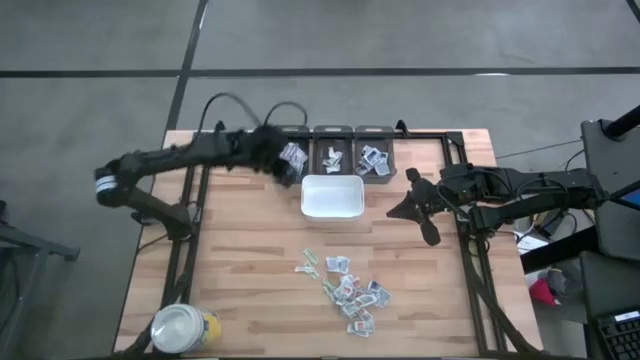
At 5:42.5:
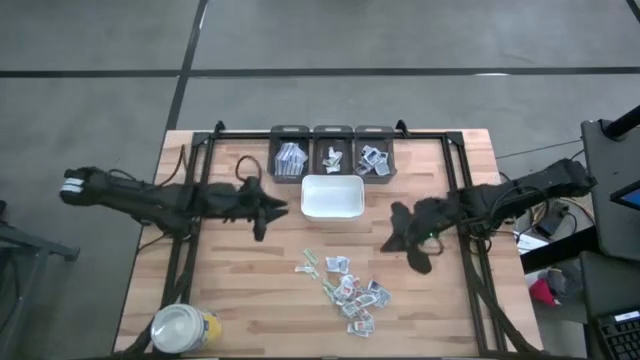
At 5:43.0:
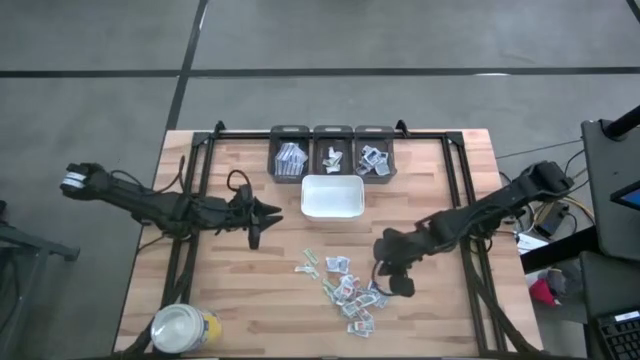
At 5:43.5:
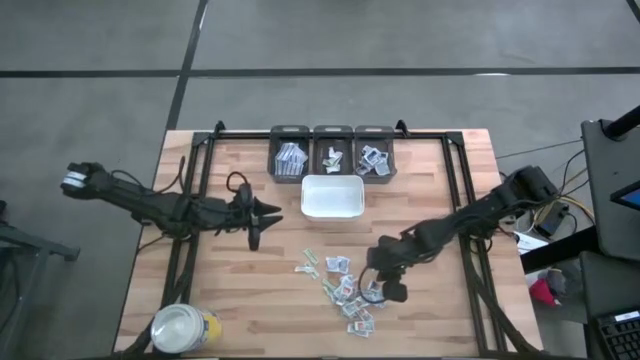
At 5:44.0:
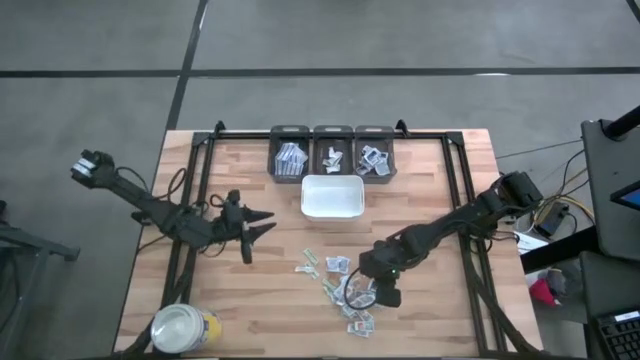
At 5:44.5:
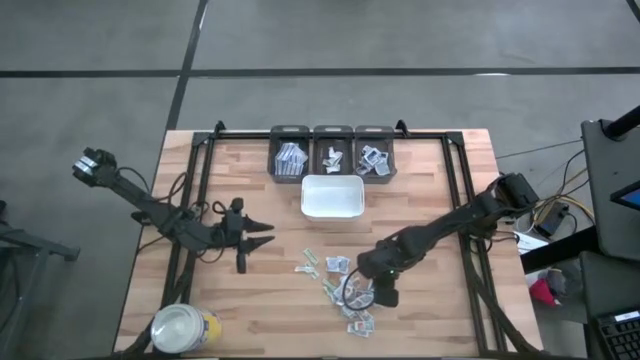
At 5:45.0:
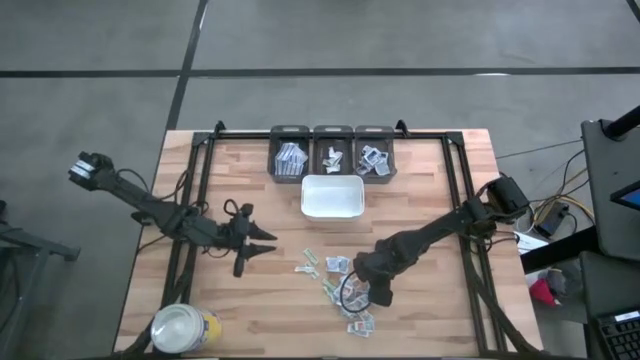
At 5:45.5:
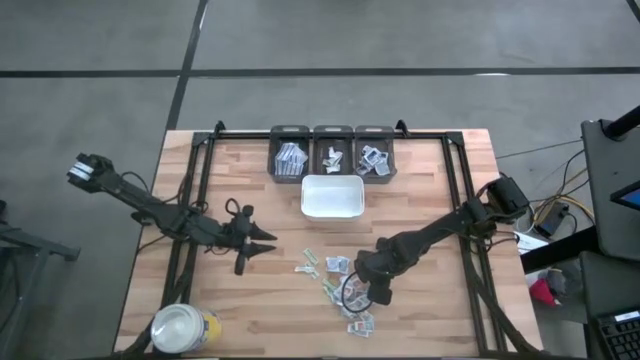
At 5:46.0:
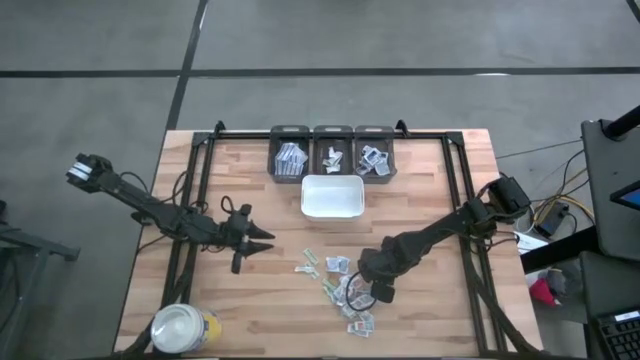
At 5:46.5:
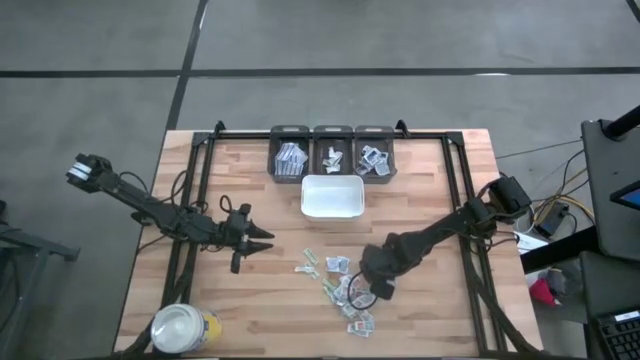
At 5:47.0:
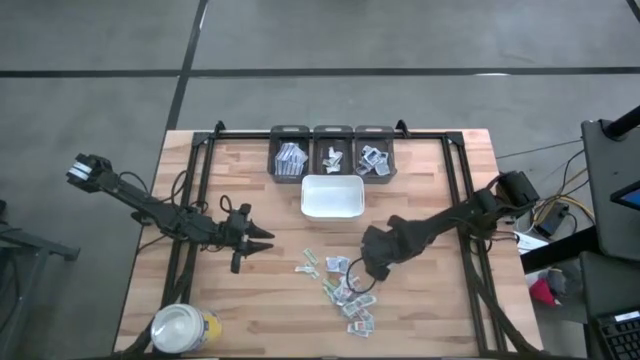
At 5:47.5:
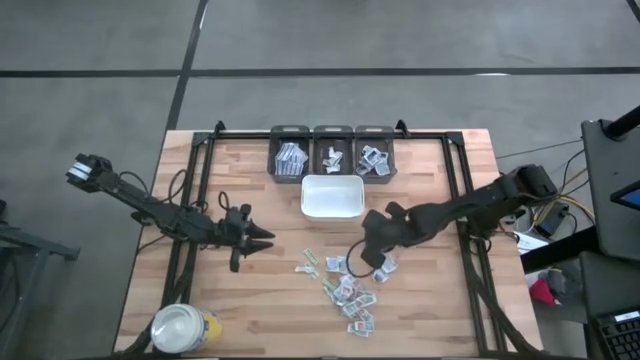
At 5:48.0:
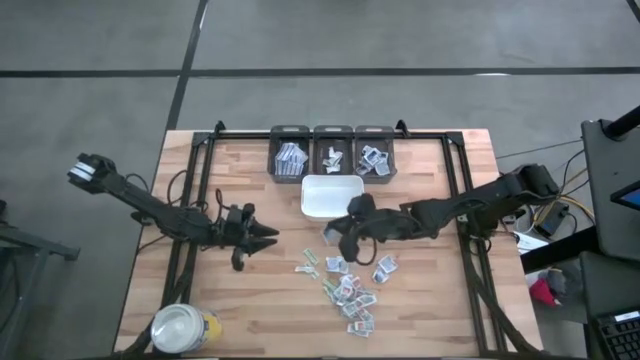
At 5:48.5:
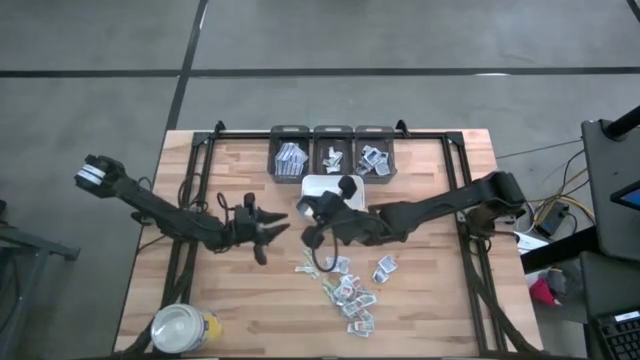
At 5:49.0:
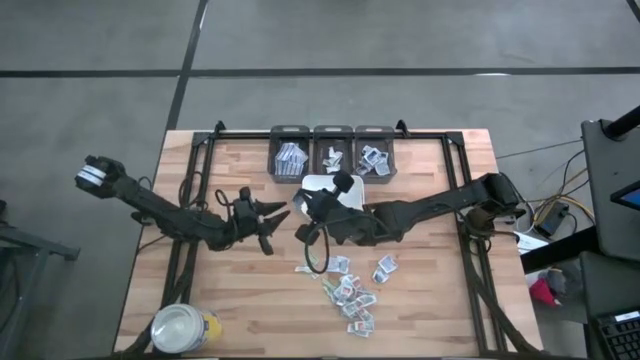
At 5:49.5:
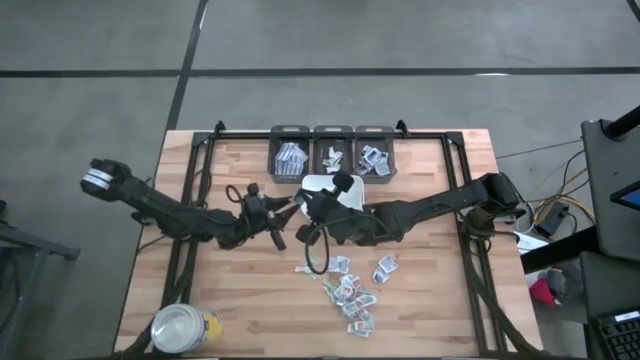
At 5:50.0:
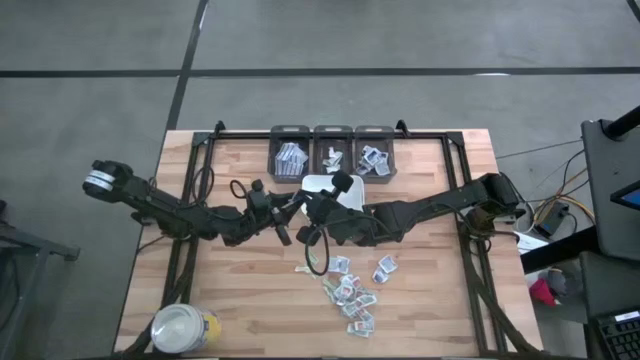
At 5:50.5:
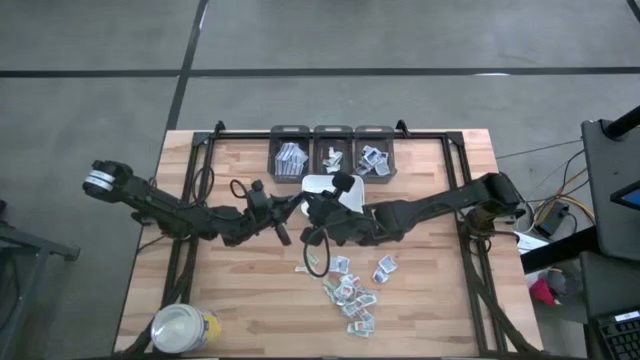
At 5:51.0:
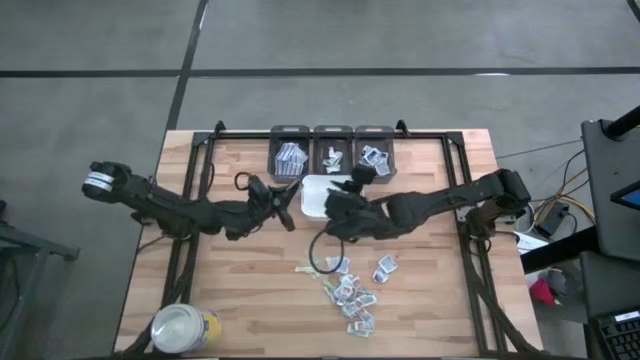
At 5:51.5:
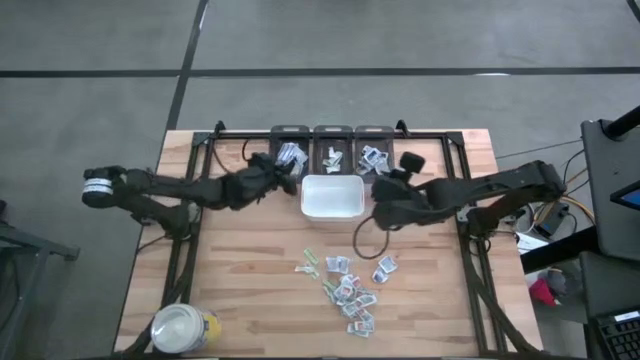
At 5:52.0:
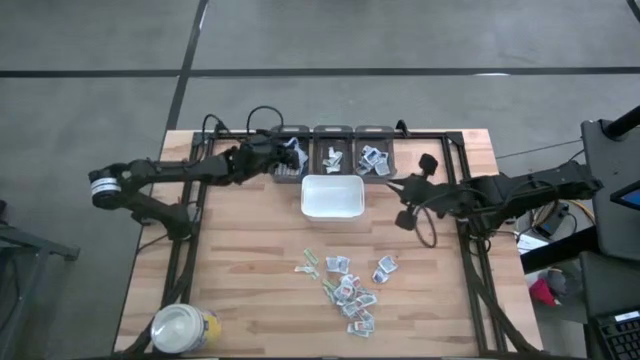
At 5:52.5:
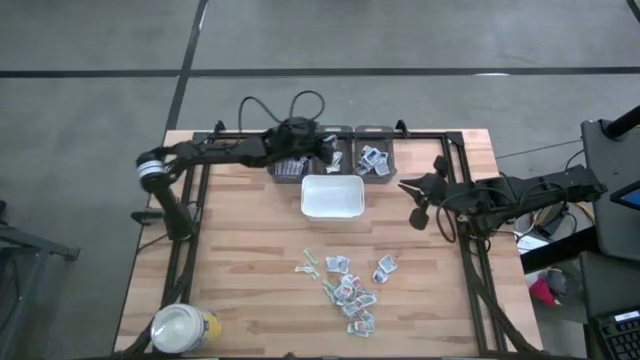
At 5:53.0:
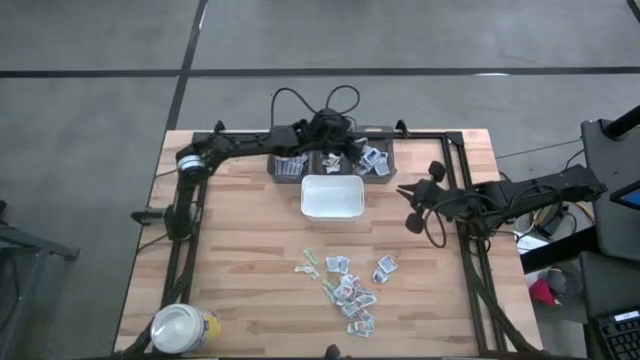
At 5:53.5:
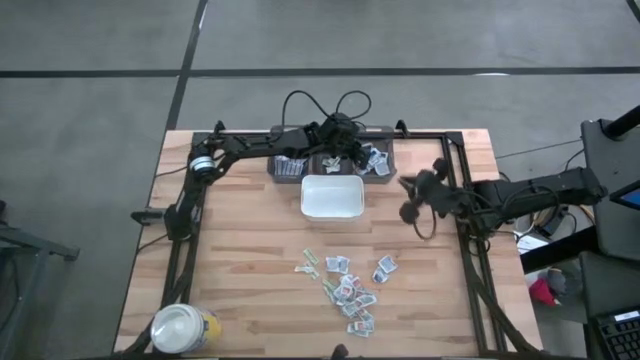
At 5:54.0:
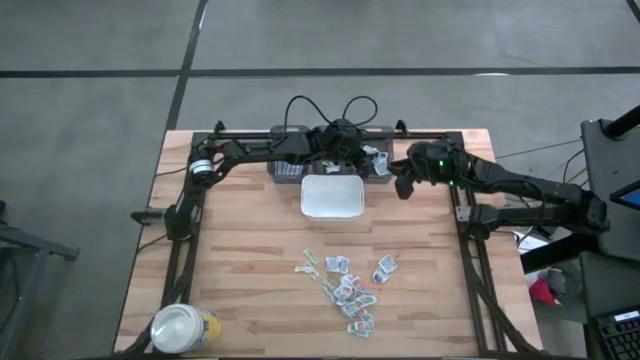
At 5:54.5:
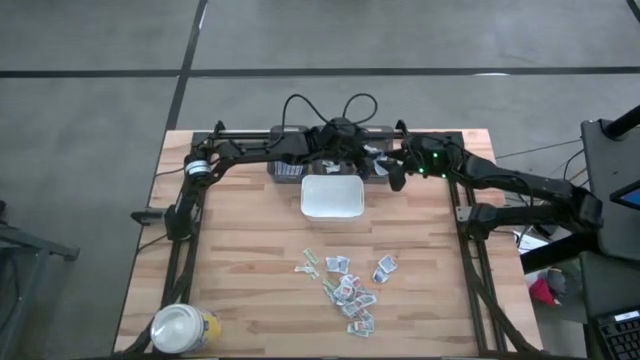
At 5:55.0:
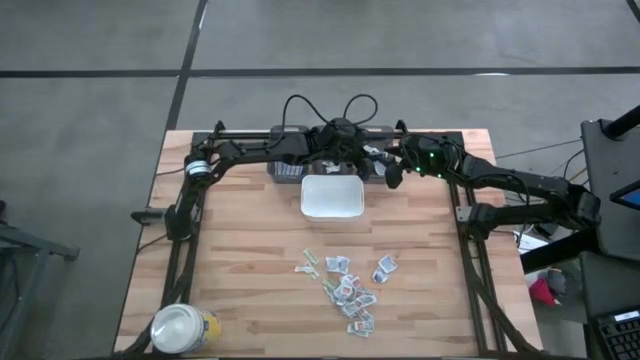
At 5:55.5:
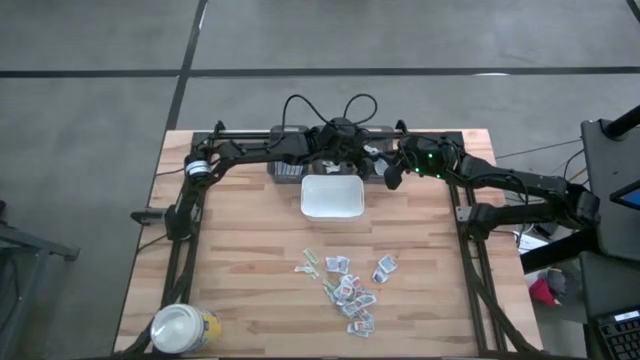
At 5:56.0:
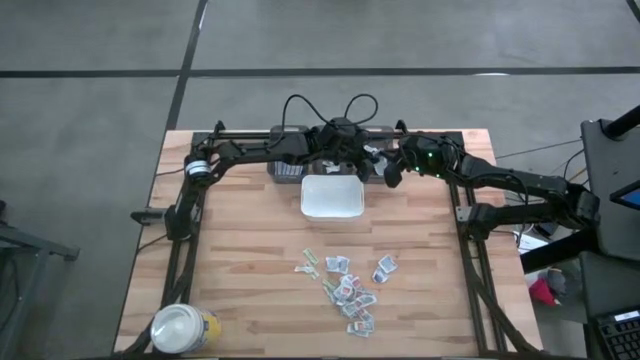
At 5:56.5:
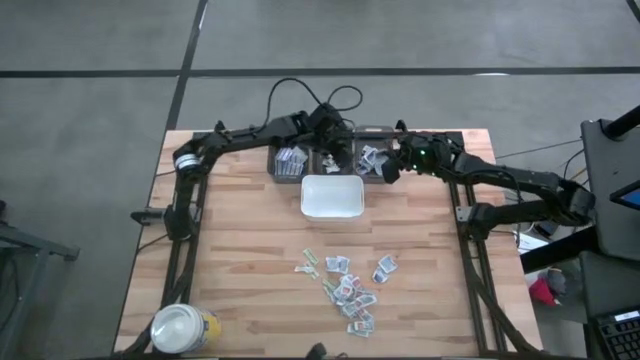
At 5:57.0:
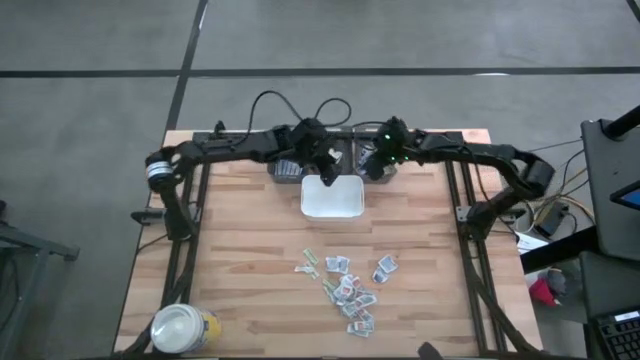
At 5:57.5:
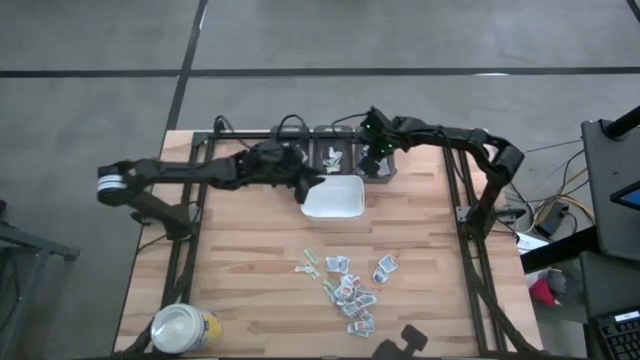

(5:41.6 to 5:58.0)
Task: Pick & Place First Aid Supplies
Put the white alcohol pad into the right black bin

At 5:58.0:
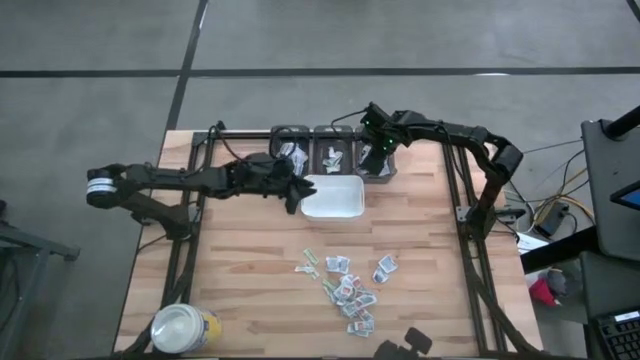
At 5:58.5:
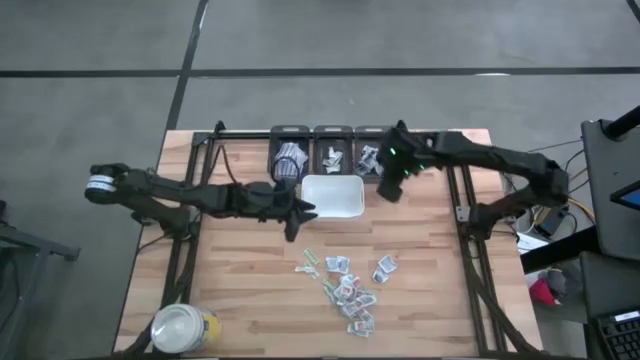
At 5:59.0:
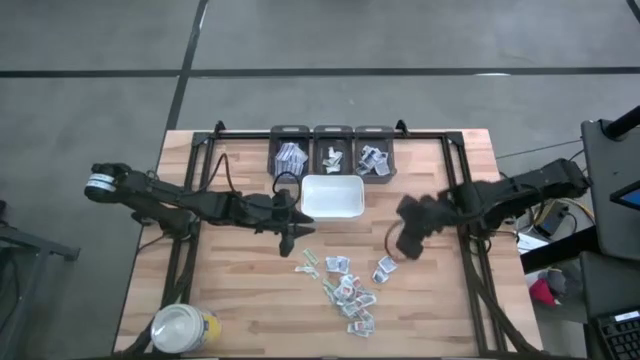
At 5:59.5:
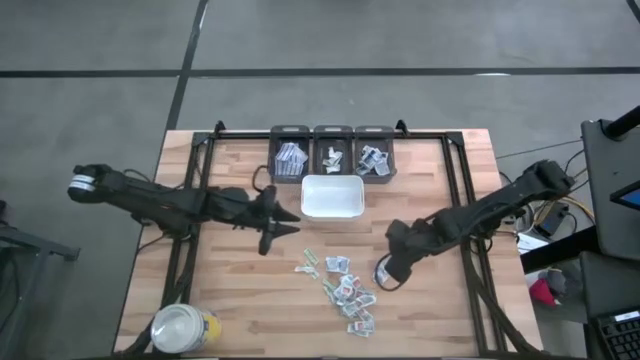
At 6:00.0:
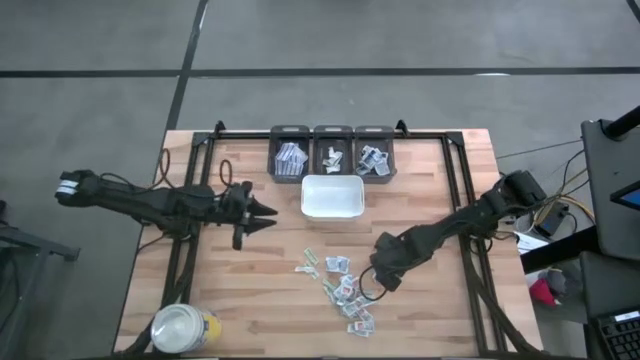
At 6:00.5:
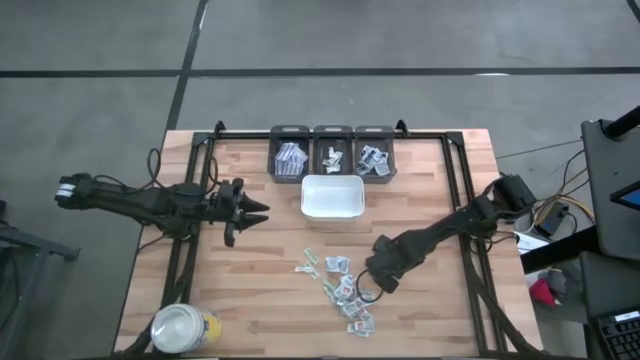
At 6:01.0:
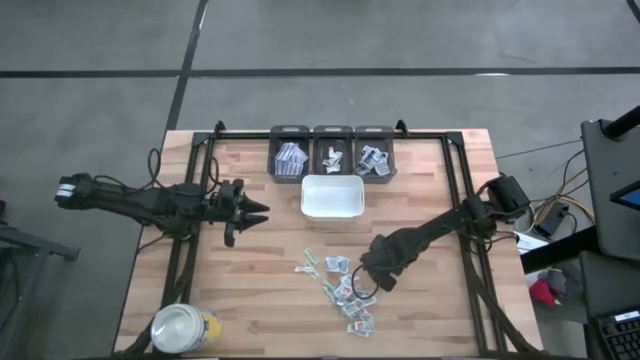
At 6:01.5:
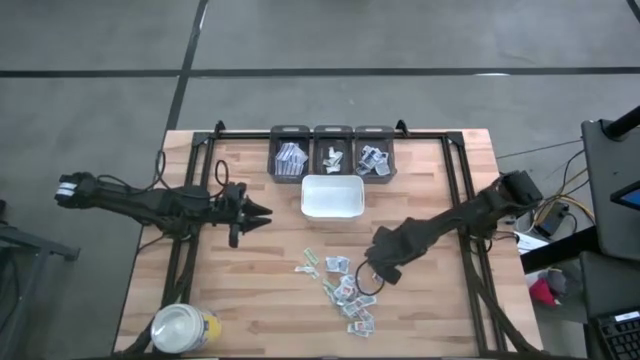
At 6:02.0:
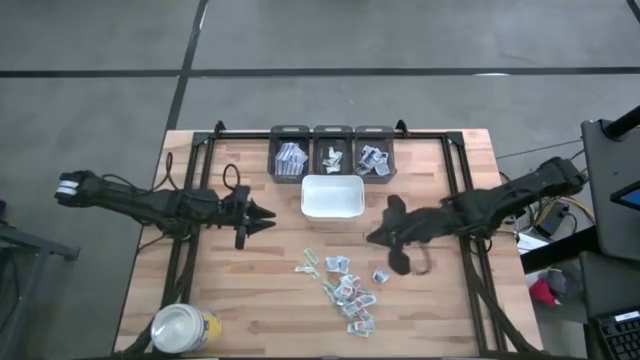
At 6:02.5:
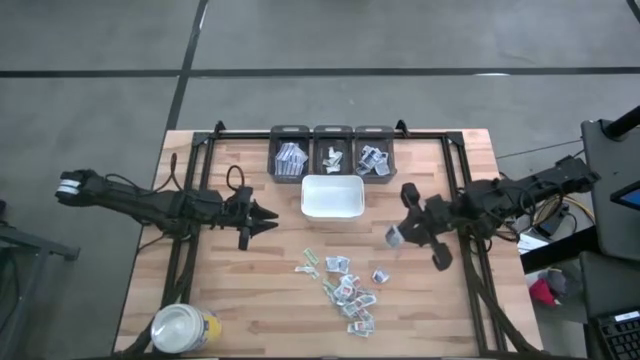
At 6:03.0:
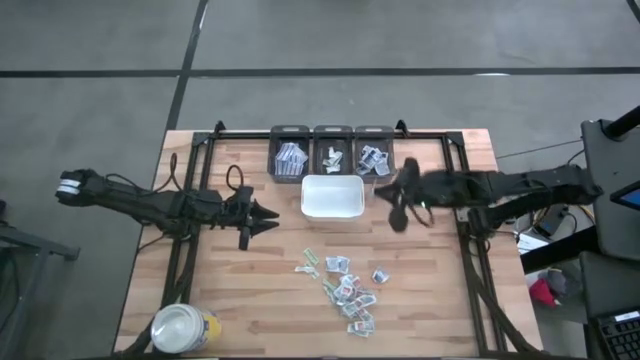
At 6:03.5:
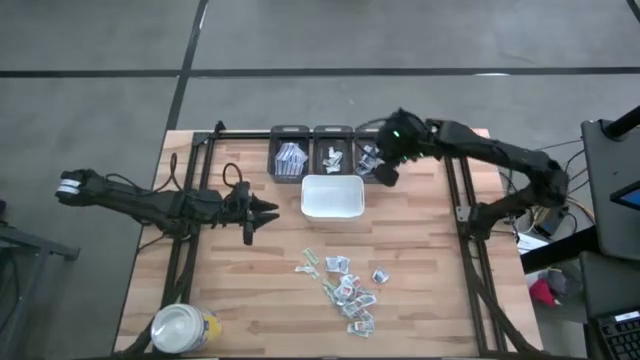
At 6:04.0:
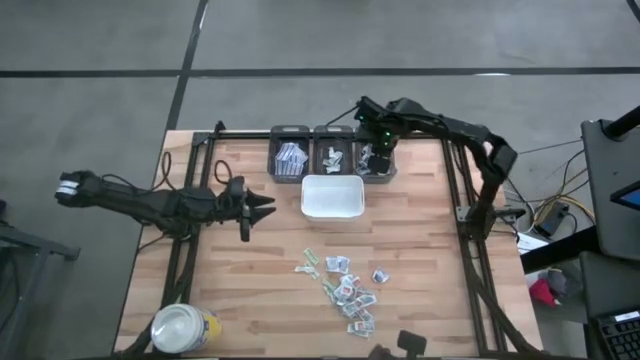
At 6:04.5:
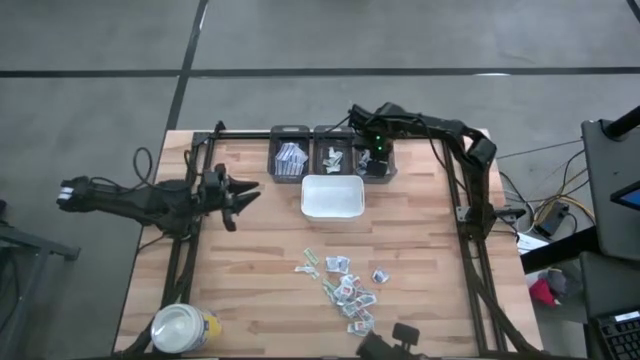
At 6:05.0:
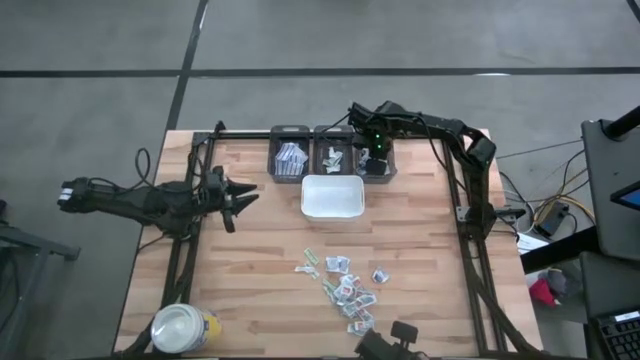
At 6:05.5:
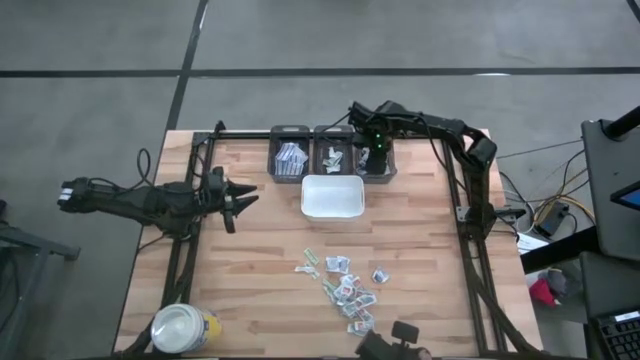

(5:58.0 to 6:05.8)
Put the white alcohol pad into the right black bin
